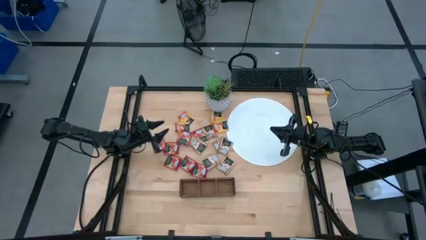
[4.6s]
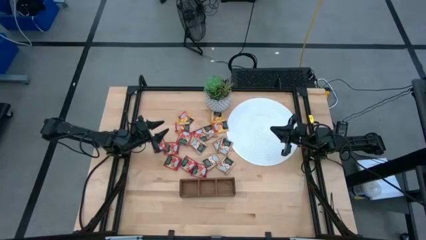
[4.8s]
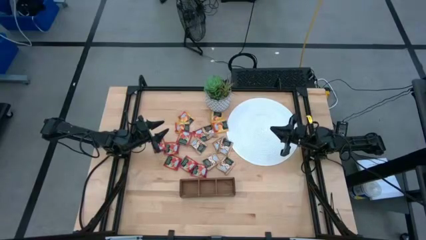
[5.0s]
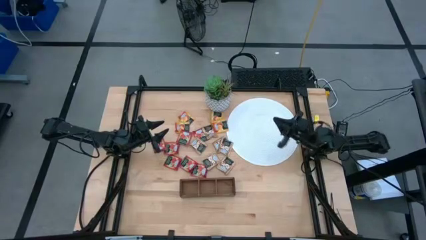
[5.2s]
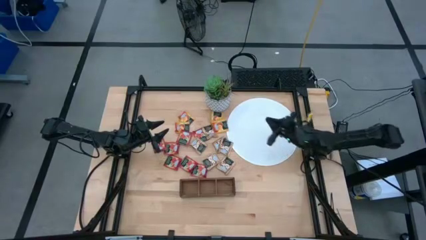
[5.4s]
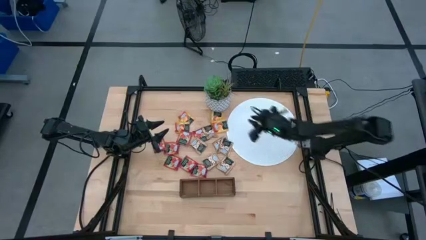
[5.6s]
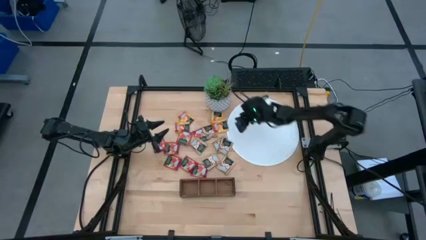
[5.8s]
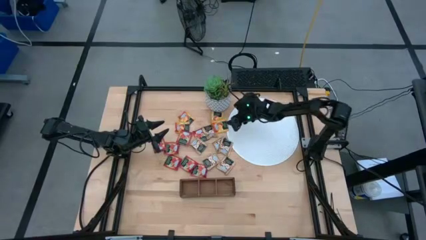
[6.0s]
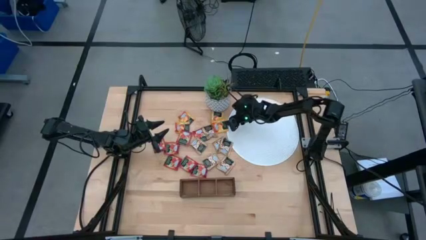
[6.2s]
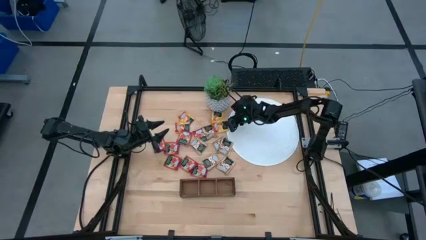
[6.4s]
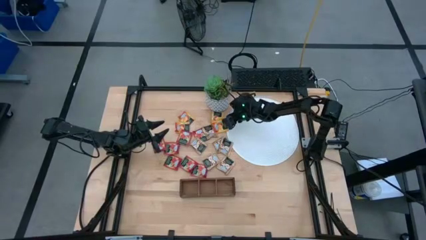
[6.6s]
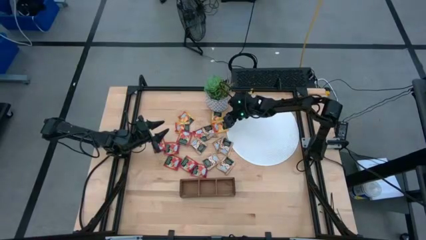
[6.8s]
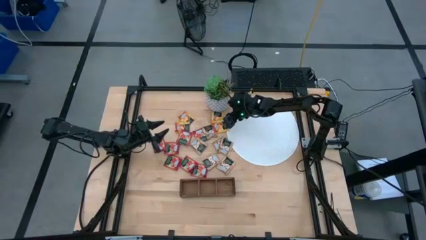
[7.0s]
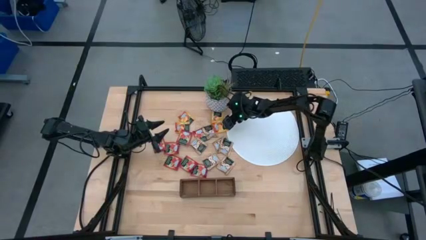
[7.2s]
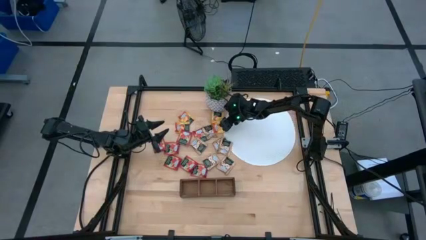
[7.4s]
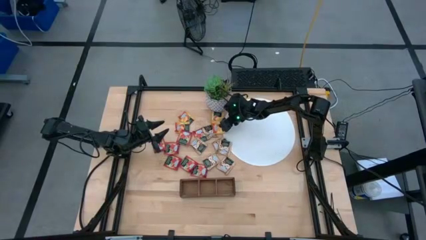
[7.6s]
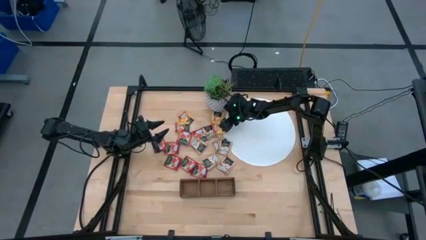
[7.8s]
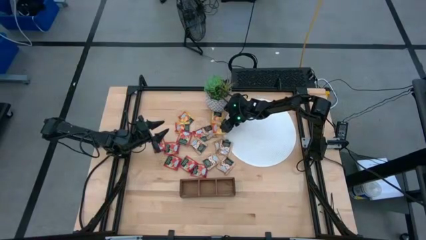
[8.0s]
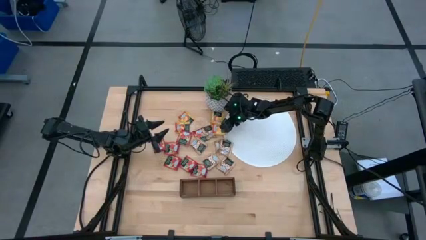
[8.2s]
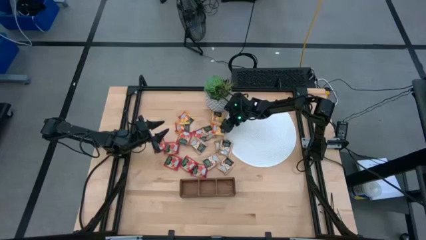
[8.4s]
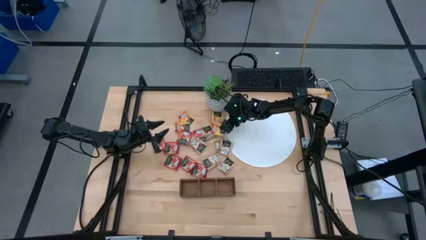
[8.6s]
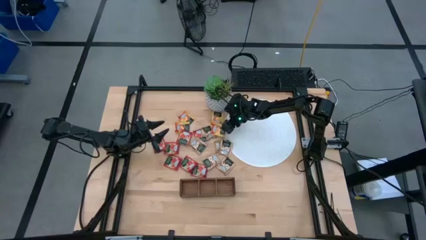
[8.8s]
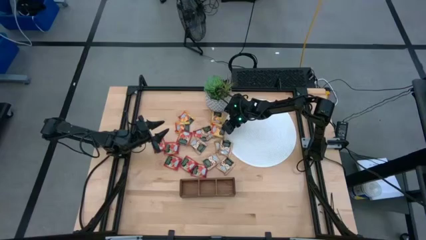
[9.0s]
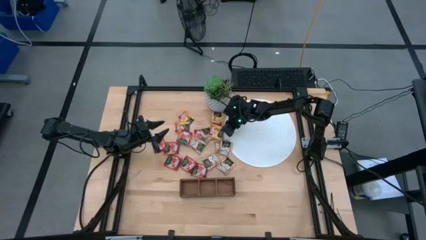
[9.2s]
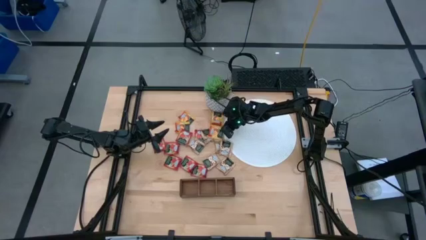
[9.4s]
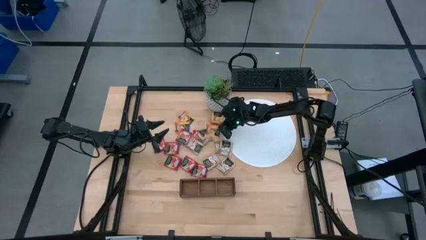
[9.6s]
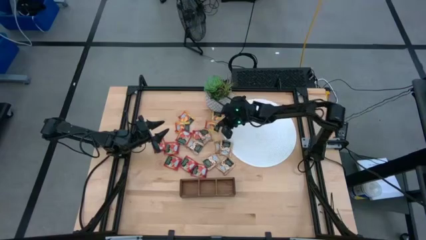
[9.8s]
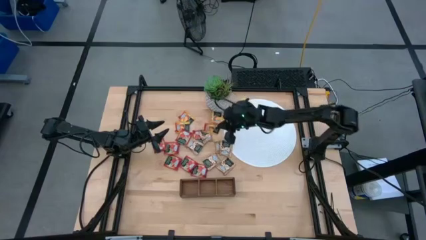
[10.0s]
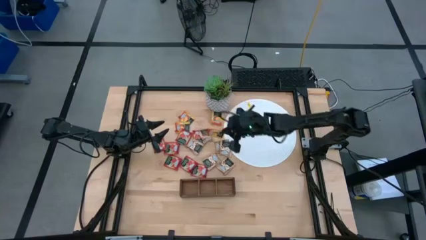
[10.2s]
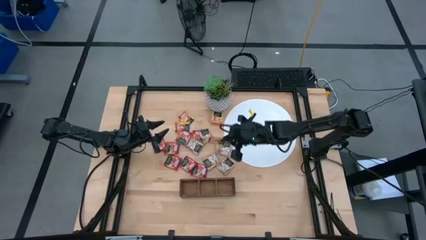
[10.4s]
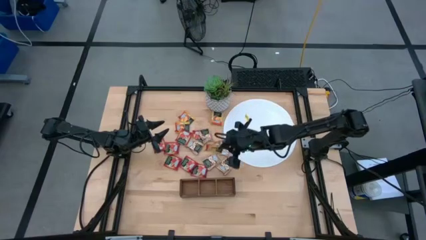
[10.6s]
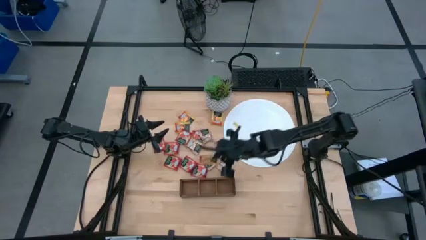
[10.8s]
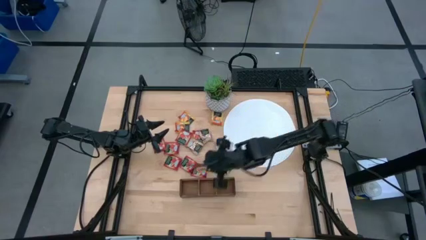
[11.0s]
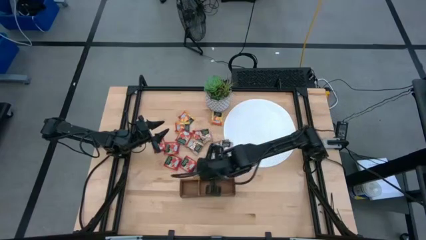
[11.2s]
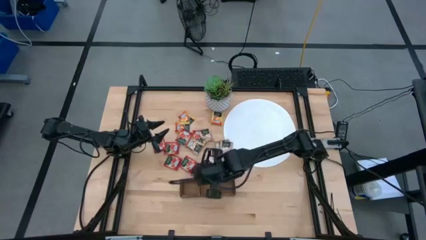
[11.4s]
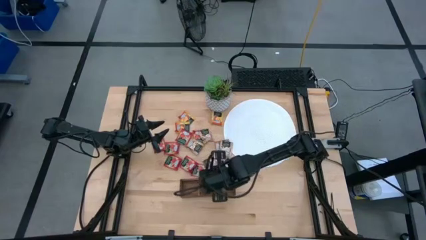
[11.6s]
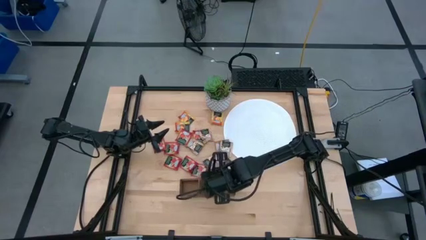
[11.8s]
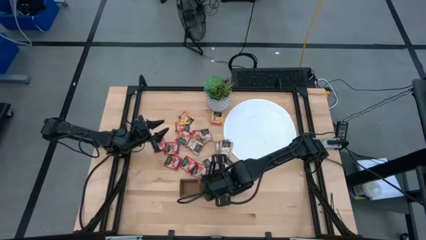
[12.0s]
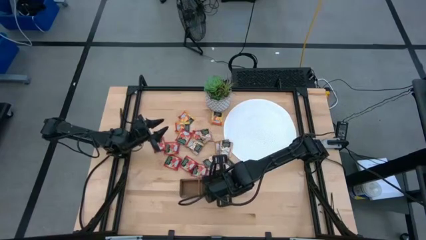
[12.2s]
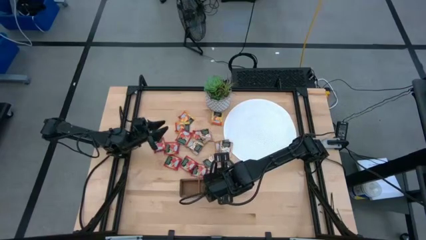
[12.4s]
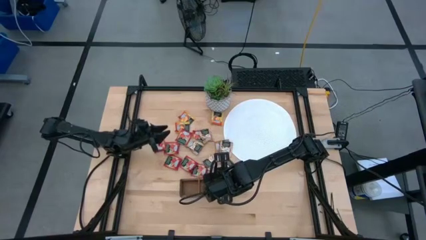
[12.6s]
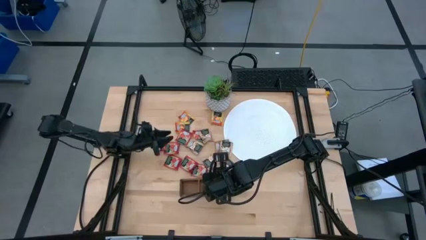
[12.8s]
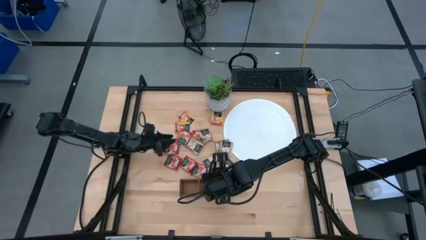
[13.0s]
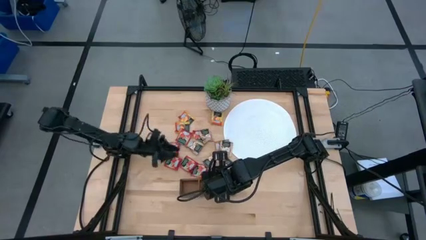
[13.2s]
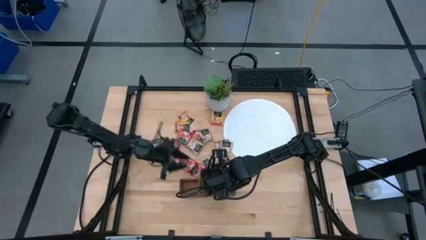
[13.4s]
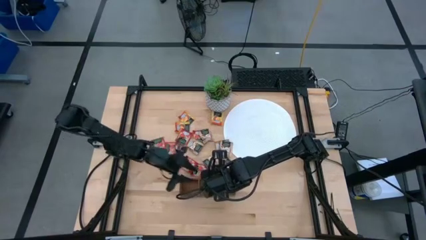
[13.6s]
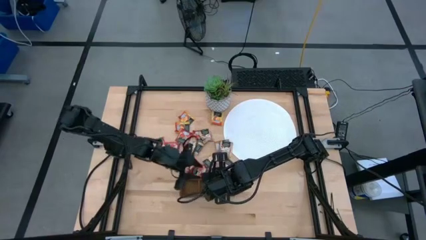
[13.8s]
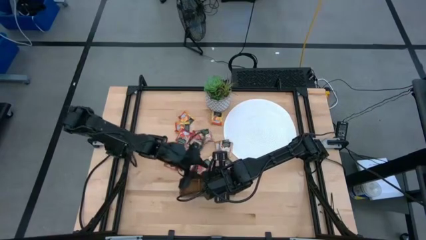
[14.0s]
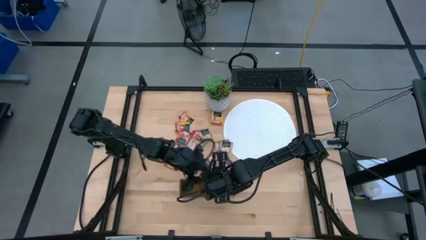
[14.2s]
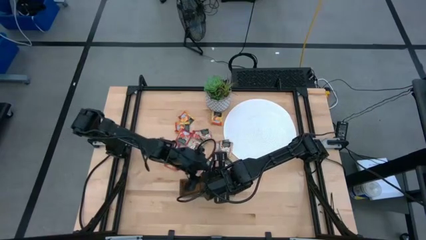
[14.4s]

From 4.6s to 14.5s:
Task: Pick & Place Tea
Put the orange tea bag into the left section of the wooden organizer

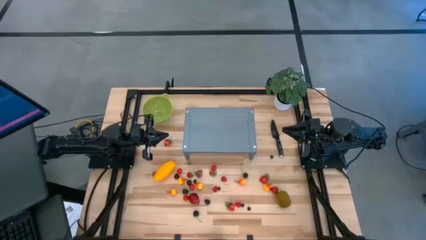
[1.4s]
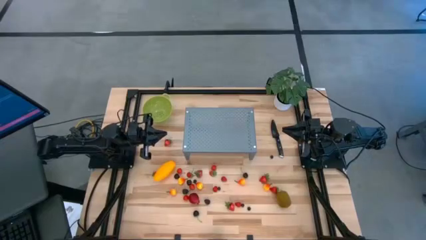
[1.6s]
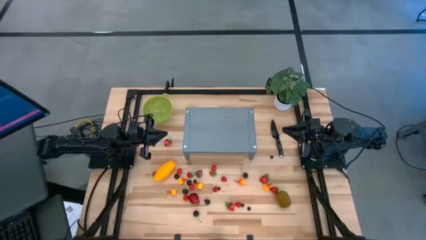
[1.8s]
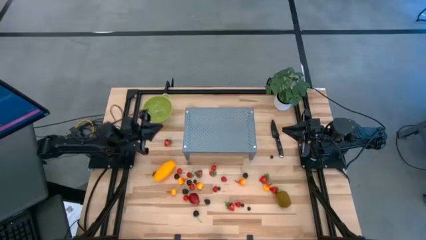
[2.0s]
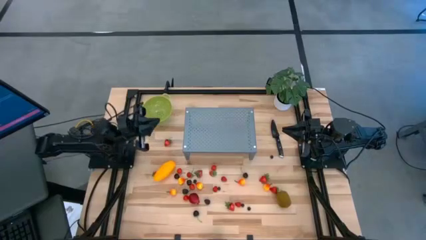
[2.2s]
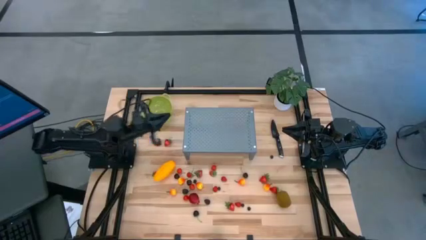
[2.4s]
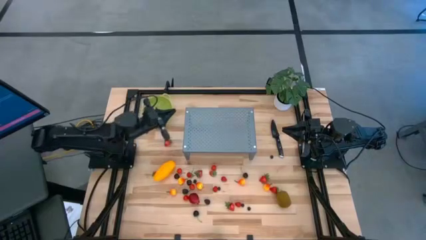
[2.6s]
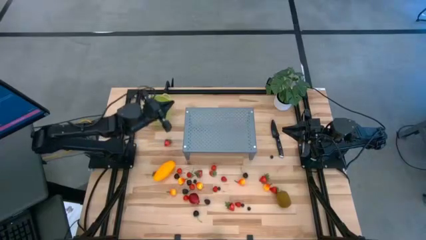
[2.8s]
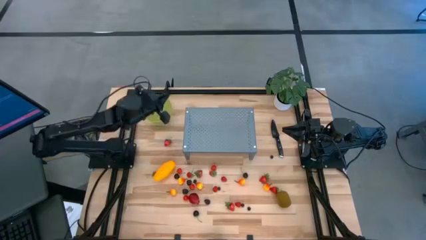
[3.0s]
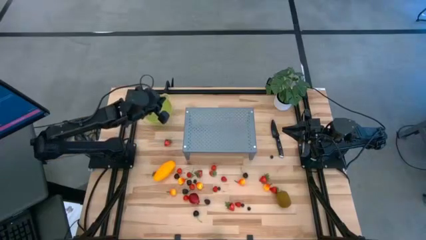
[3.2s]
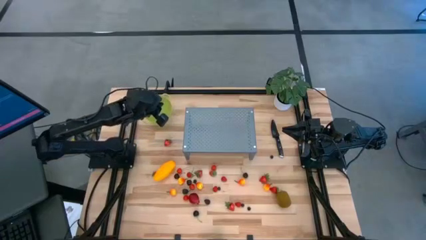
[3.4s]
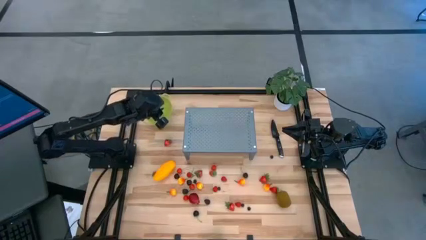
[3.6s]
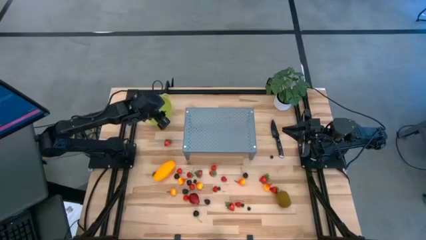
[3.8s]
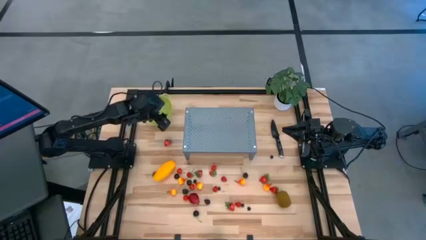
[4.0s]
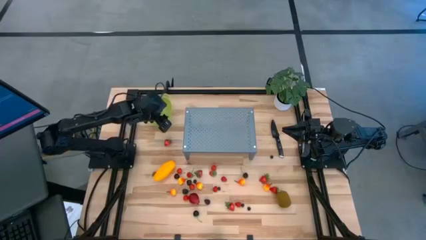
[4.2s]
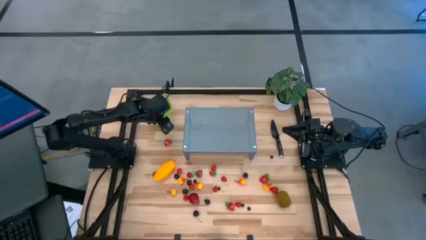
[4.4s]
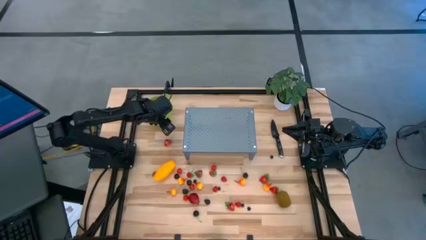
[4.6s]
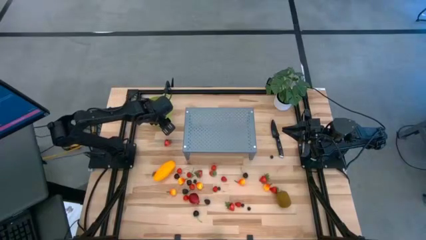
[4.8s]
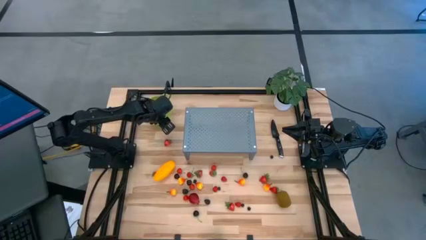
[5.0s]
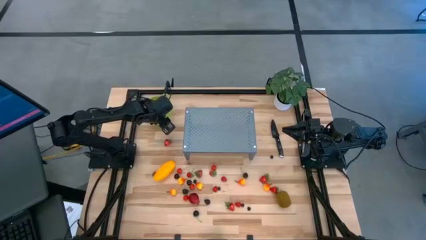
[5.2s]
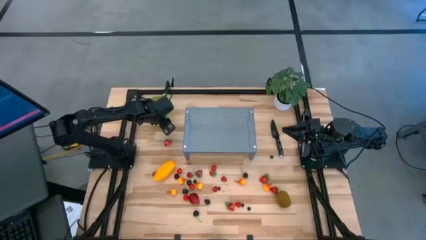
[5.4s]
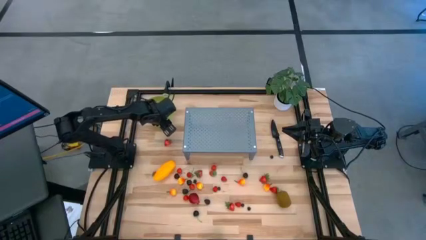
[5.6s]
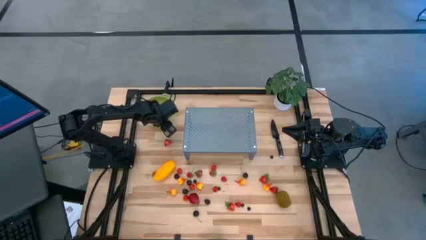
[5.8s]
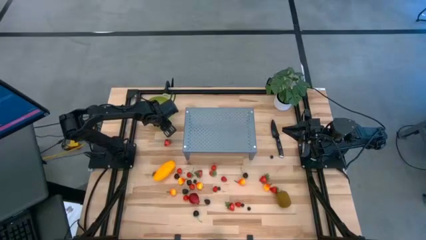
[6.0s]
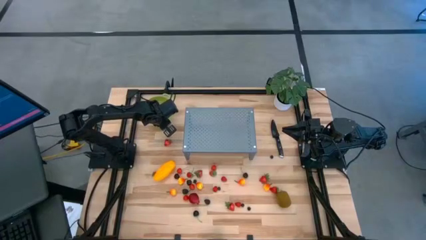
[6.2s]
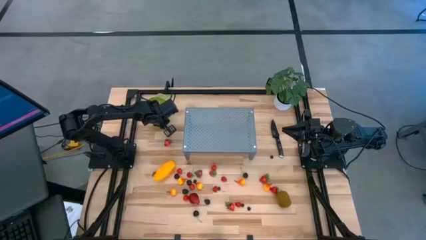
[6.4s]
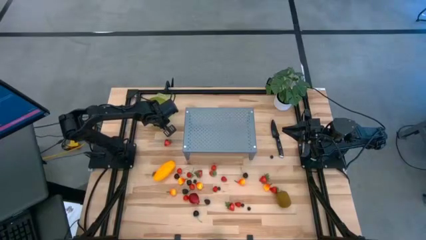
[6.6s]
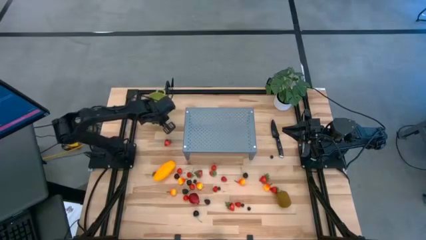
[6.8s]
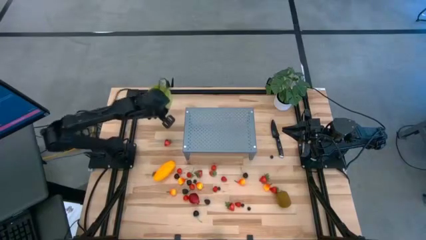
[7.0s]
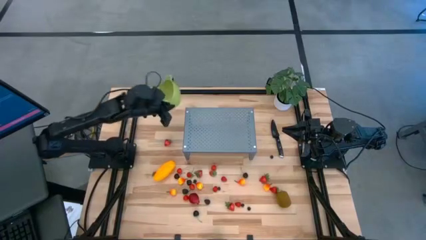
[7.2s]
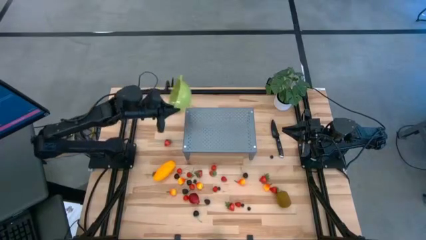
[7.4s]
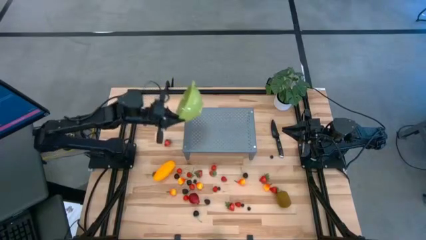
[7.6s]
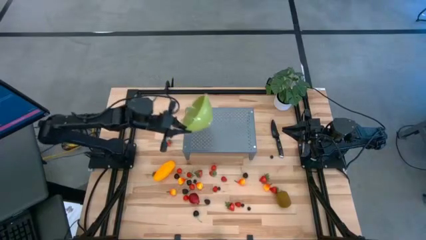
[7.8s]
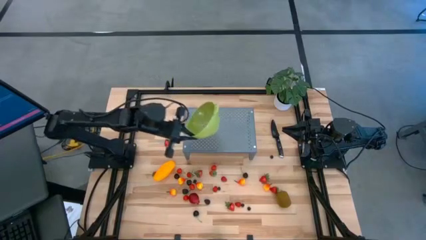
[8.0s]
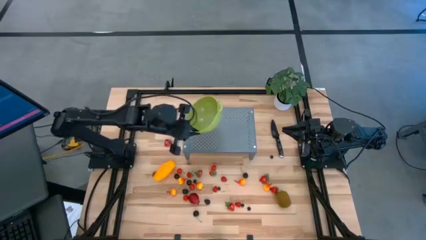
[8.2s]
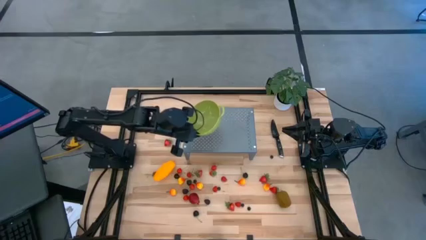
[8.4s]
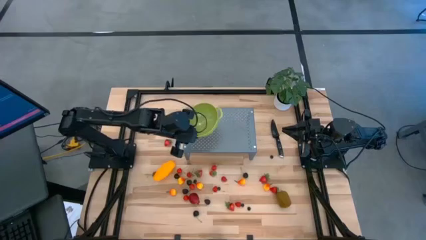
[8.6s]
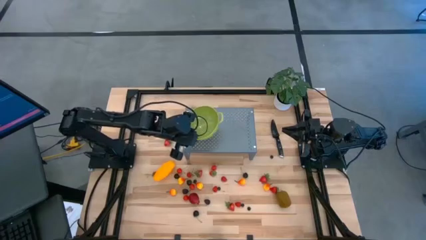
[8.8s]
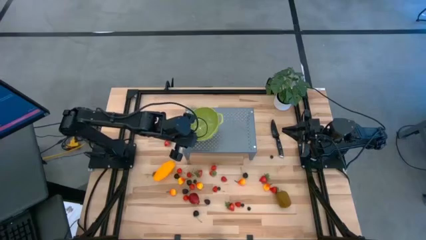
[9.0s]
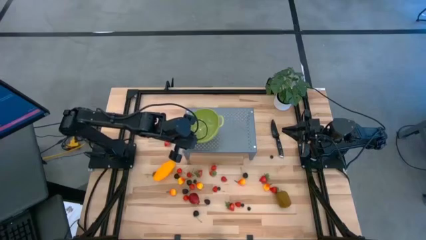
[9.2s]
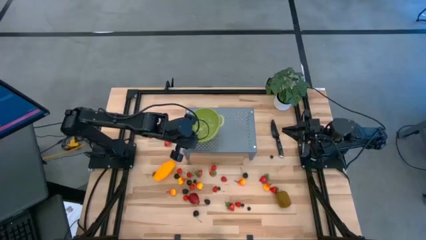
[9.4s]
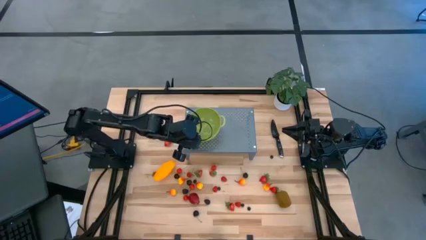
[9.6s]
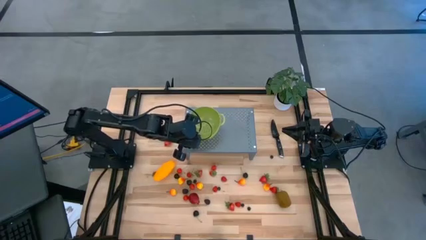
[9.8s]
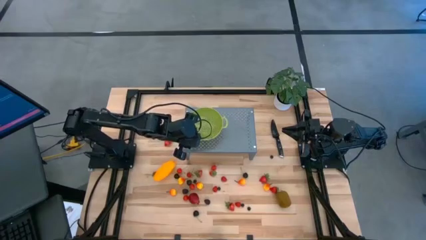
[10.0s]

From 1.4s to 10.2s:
Task: Pick & Place Fruit
Put the green strainer bowl on the shelf
